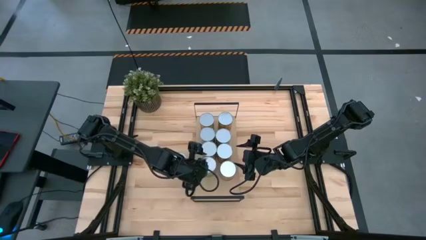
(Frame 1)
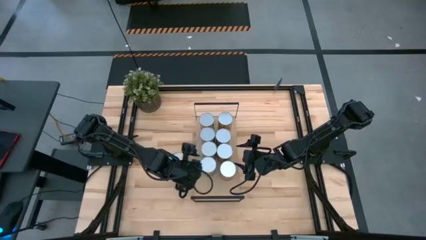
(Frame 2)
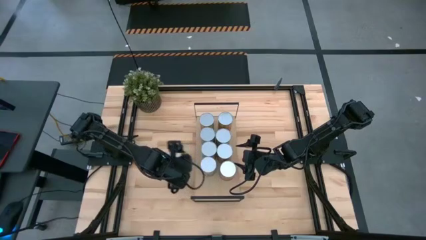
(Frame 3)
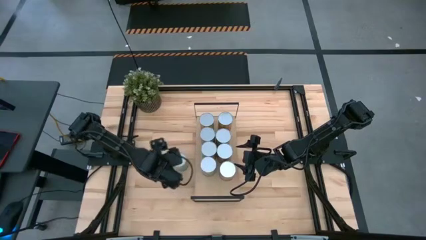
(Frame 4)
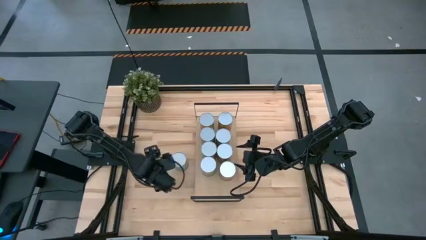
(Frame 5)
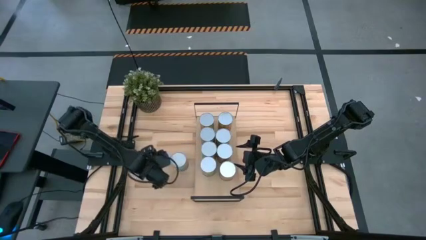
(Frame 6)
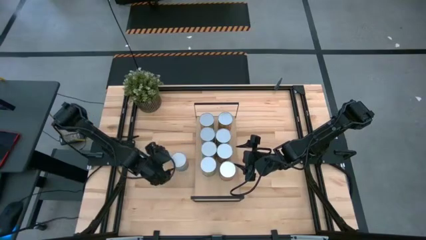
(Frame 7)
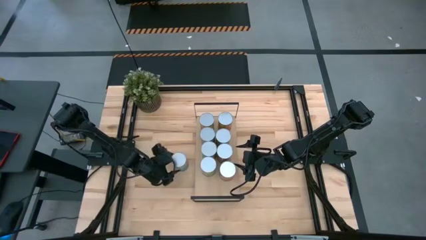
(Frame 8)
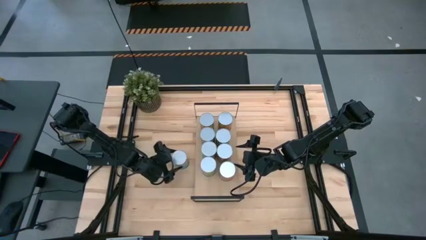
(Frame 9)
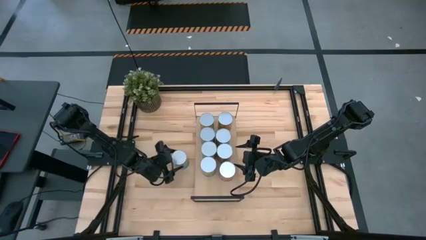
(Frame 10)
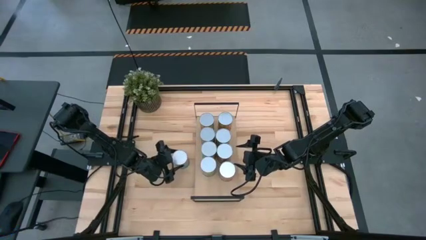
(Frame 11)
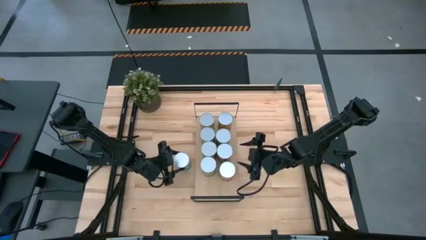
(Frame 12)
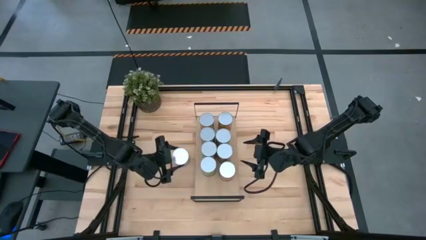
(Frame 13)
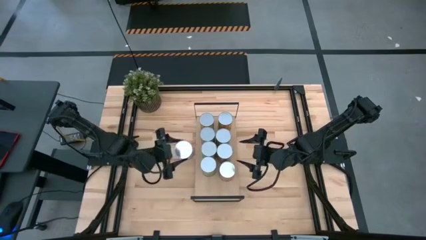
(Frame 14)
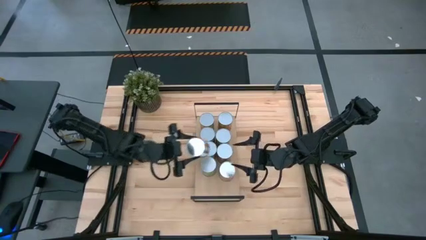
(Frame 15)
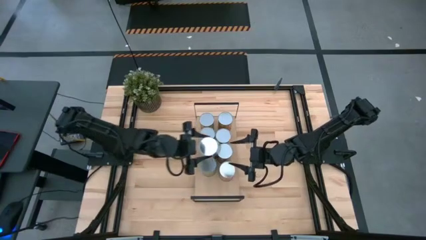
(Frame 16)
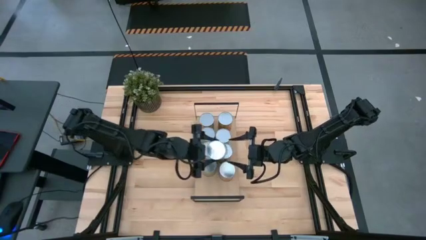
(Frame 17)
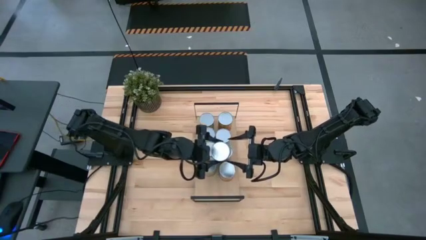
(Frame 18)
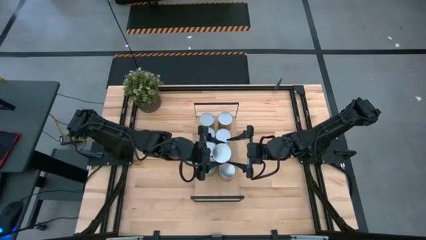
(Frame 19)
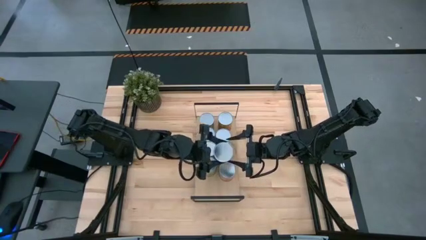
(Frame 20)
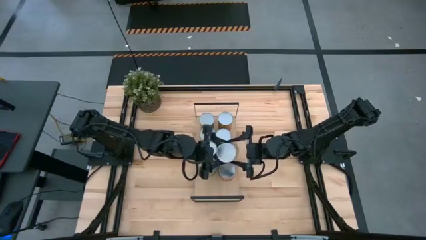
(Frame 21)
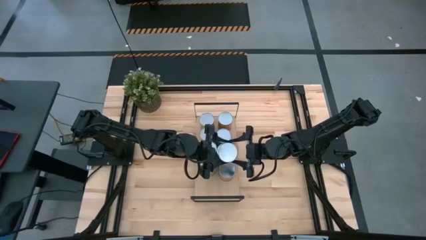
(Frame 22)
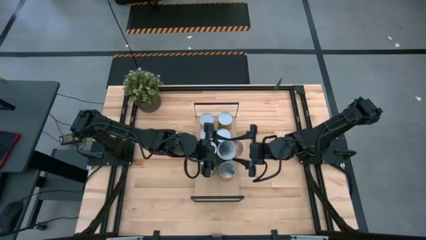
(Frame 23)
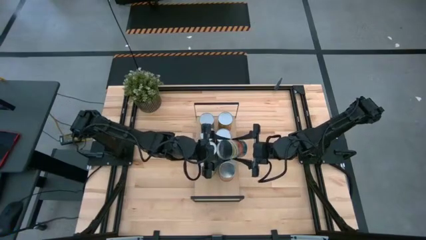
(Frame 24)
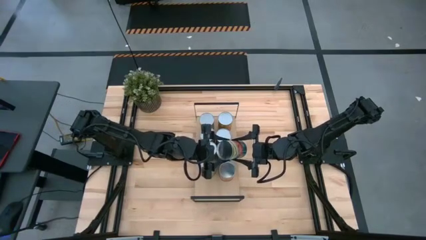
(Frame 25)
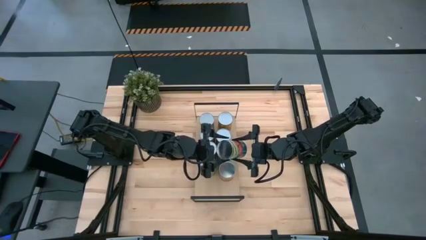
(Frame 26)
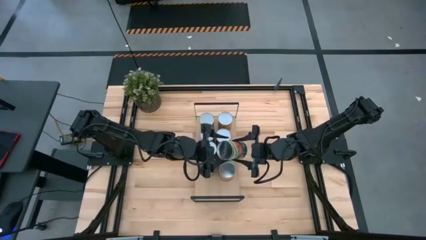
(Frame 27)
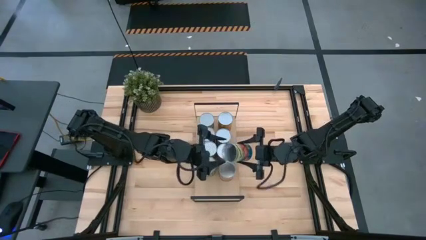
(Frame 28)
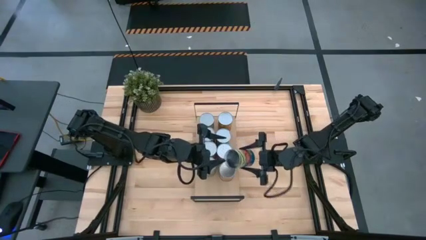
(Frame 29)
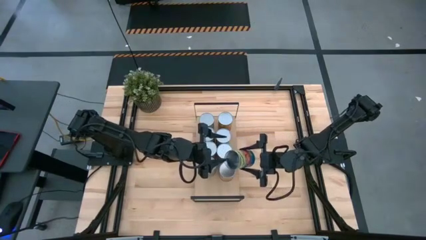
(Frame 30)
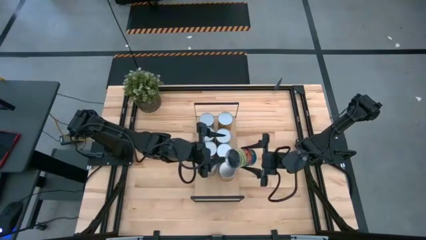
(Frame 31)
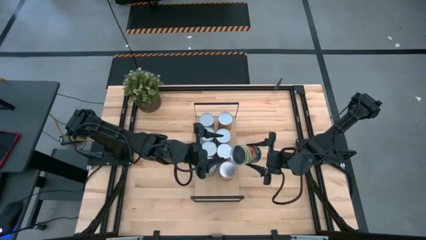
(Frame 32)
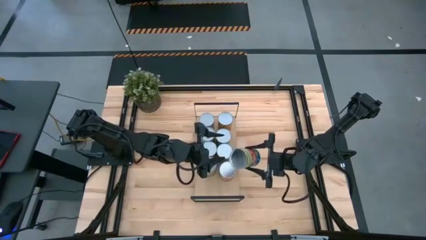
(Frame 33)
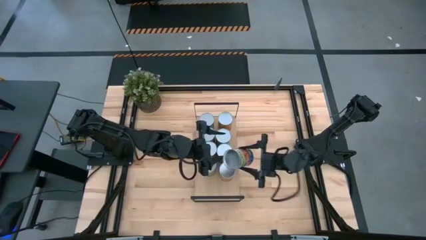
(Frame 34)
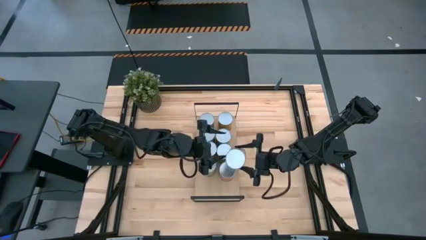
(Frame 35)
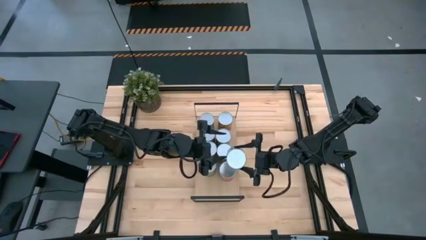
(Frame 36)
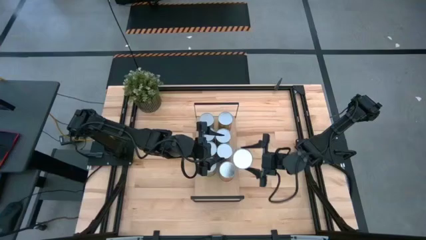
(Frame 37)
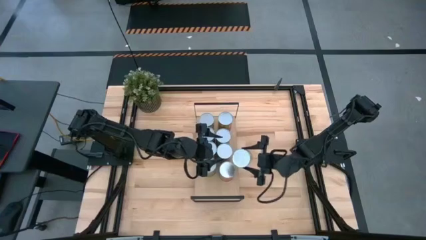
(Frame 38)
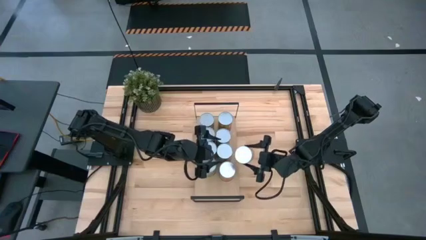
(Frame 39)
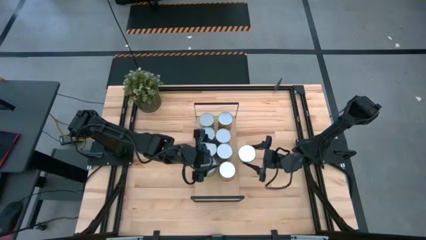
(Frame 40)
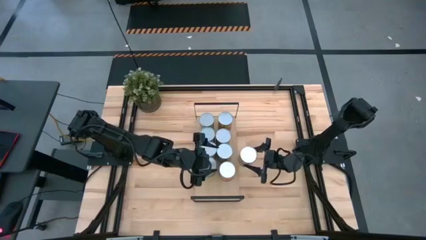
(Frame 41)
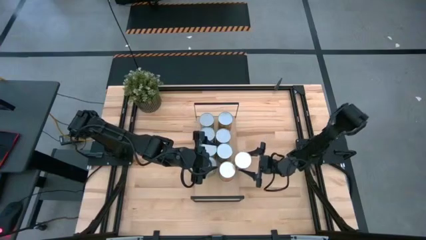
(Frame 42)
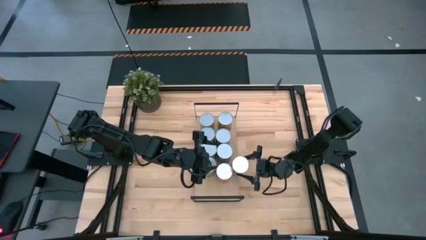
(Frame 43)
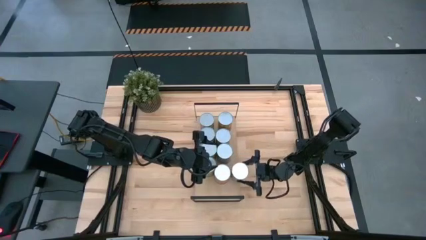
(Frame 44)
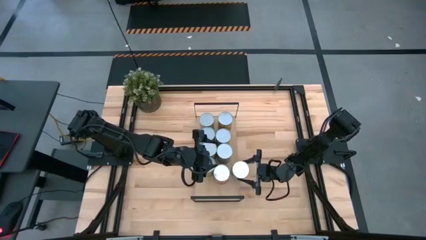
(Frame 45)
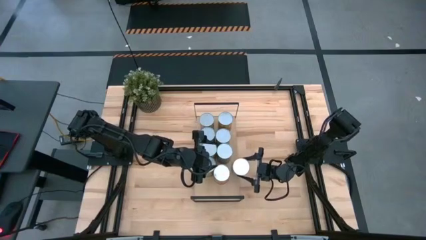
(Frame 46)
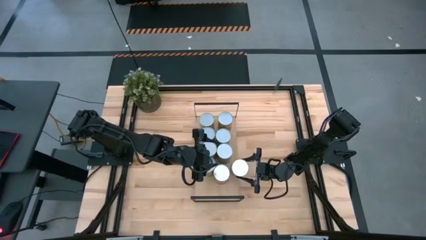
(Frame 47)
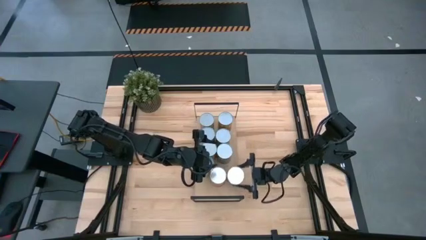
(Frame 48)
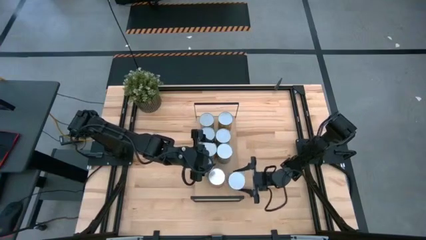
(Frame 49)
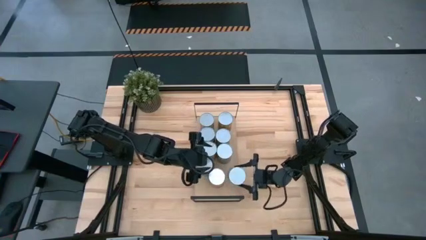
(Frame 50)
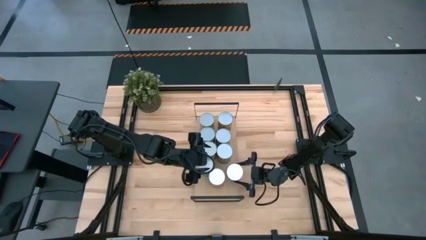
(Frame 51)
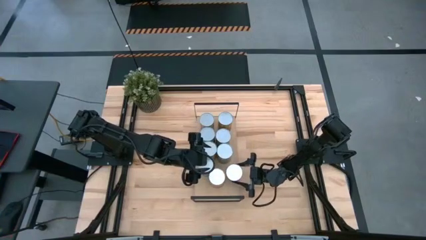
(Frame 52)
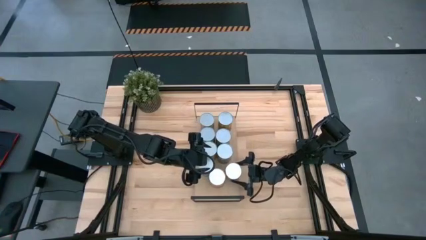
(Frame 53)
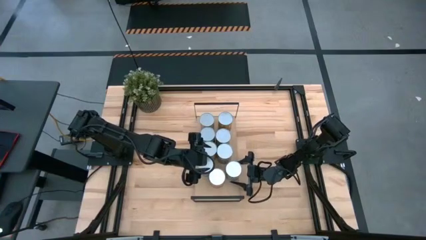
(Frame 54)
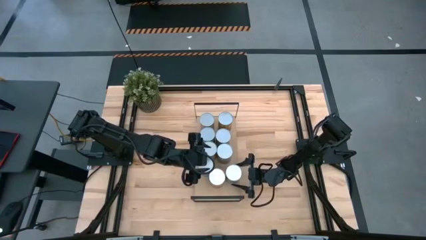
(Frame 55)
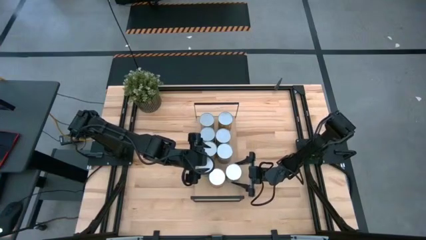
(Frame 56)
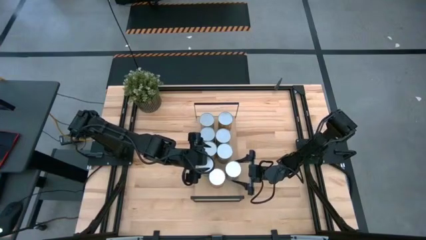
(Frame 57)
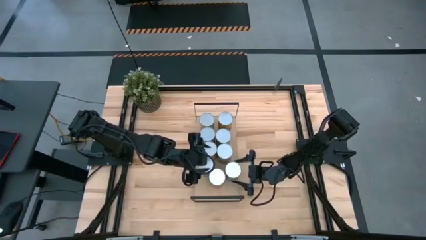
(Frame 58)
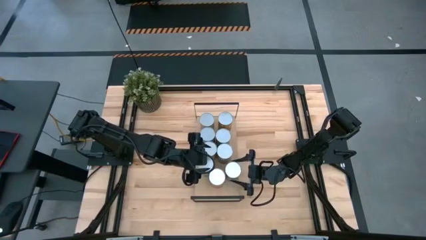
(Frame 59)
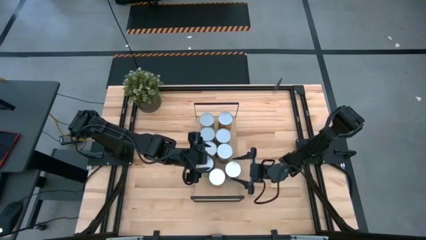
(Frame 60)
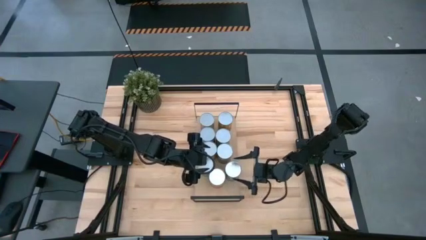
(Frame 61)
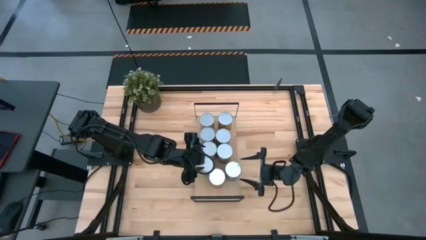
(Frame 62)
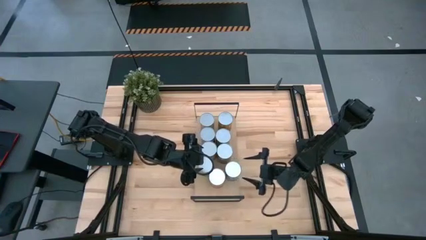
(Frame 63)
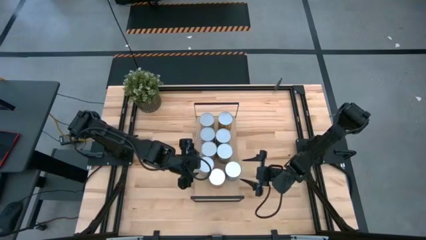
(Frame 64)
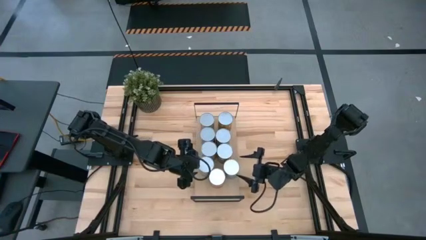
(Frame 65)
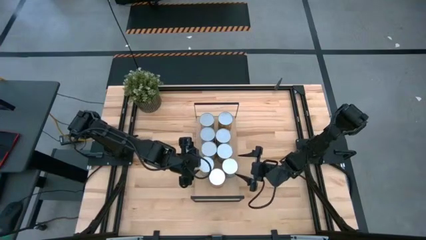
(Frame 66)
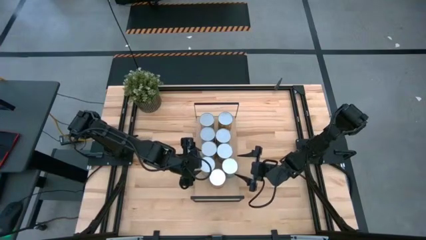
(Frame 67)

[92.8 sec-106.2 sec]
Task: Pick and place cans onto a shelf
Put the canned tomatoes on the shelf

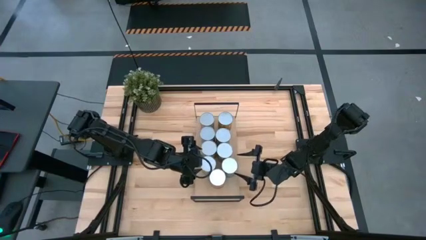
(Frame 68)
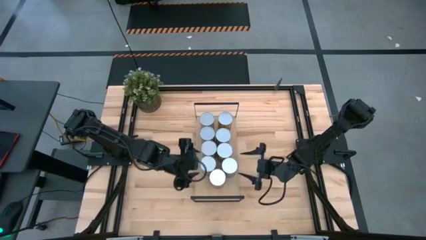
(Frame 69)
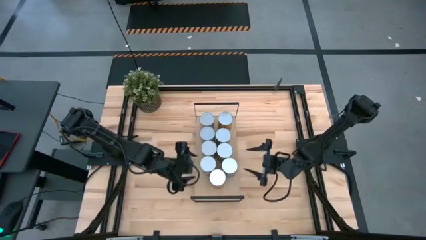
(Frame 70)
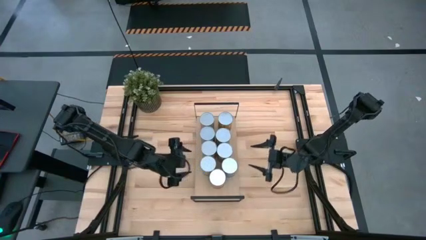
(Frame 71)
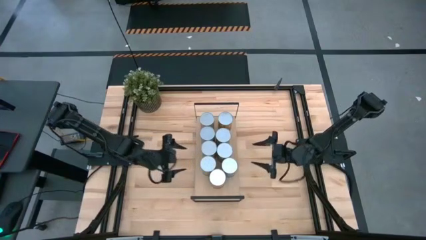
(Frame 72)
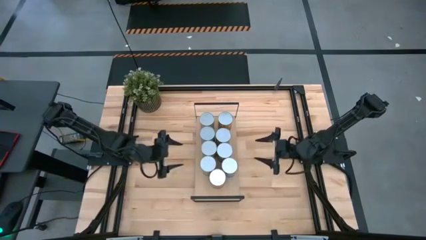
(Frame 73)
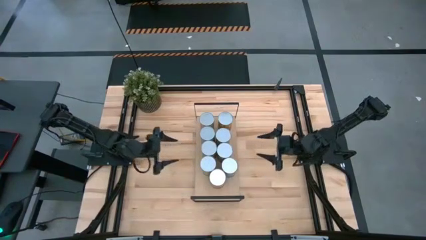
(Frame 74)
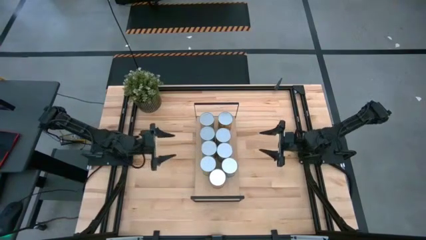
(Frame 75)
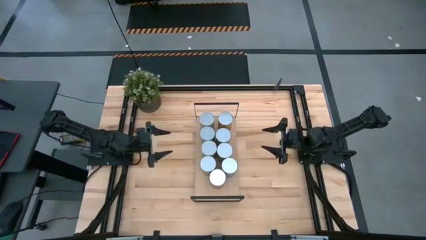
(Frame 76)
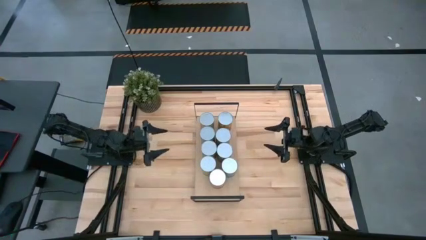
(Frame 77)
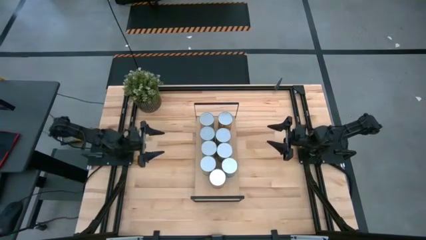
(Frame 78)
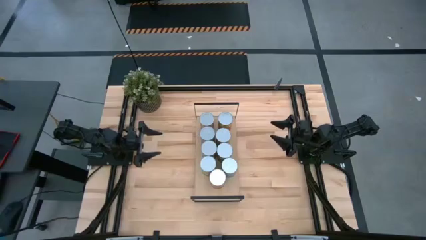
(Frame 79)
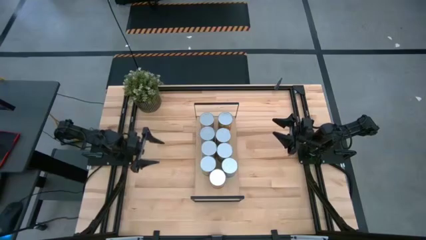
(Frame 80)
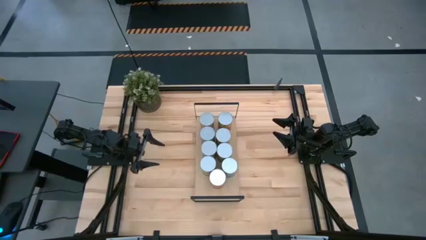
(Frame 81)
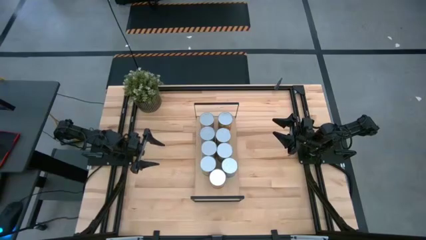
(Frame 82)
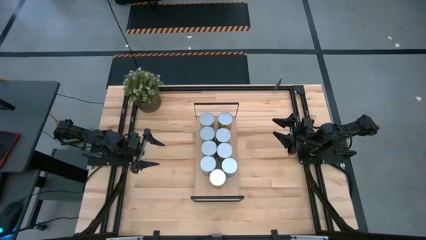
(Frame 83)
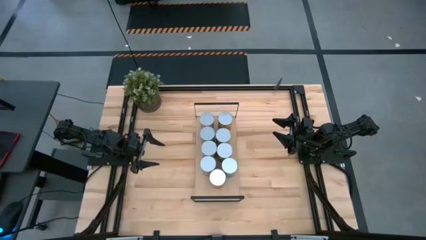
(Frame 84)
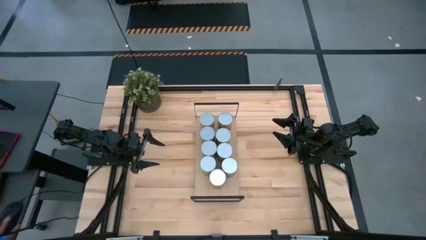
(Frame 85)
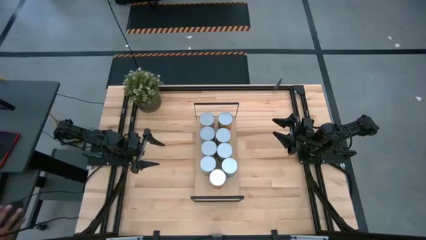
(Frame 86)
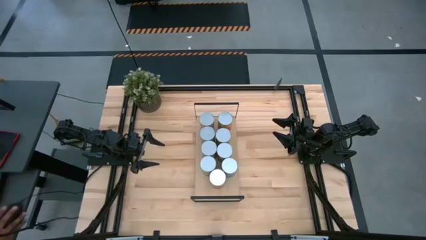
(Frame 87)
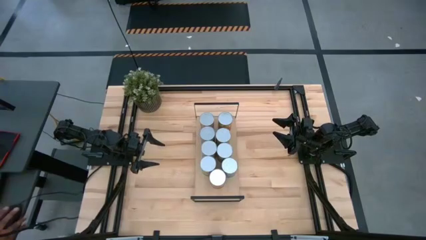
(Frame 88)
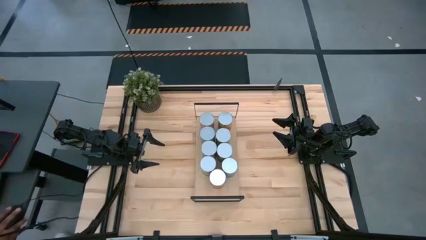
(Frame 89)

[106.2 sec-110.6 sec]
Return to Home Position
